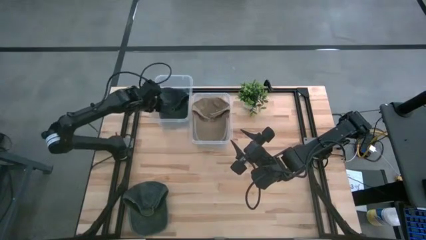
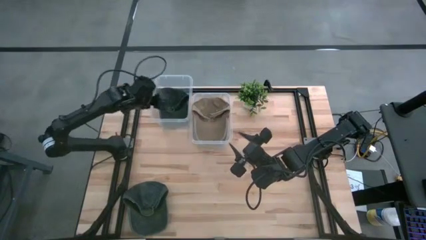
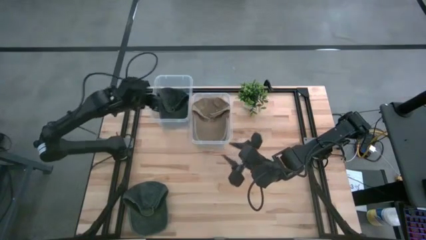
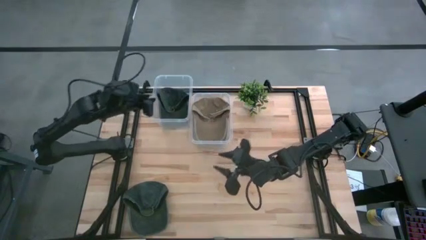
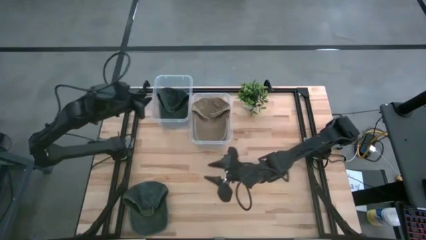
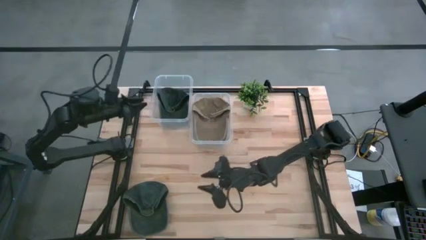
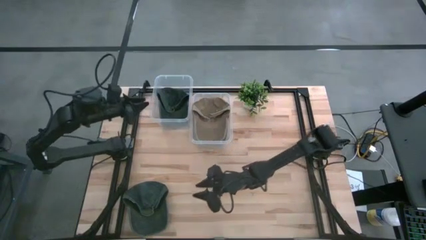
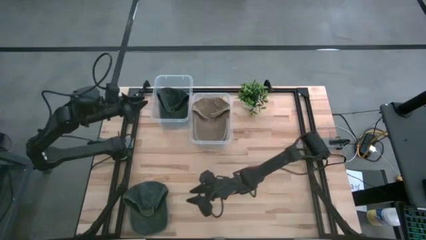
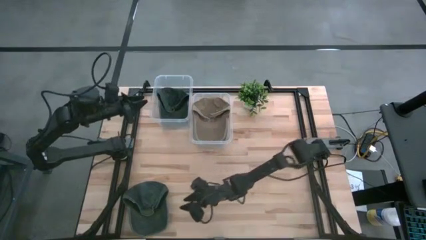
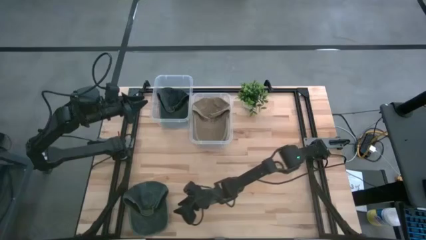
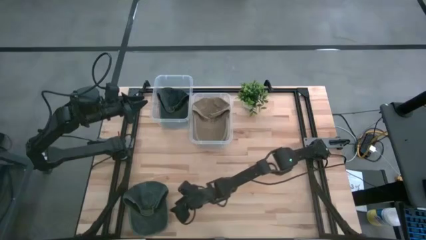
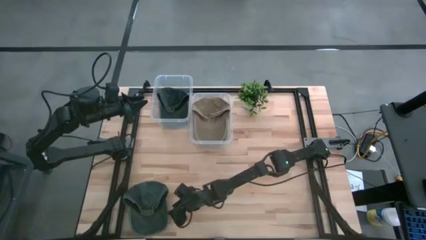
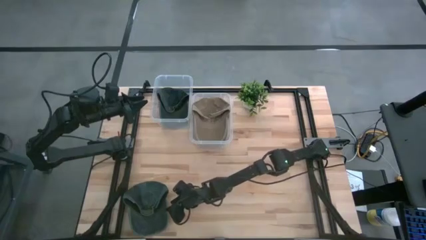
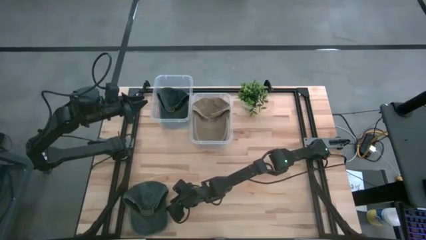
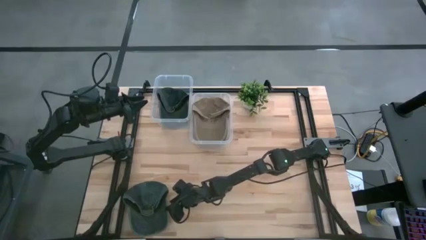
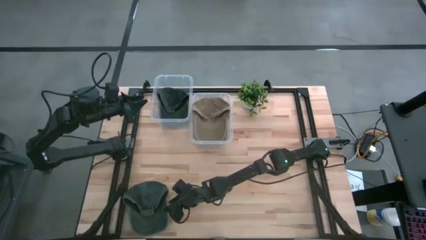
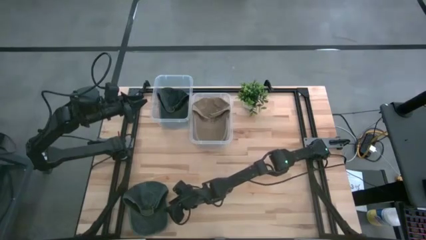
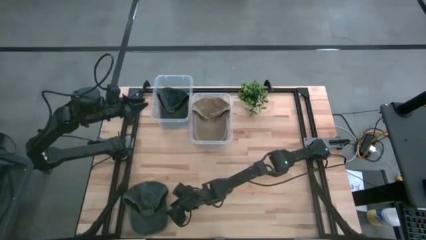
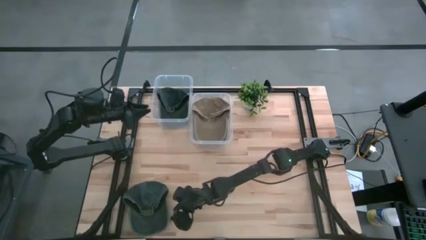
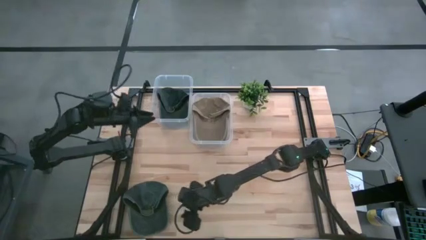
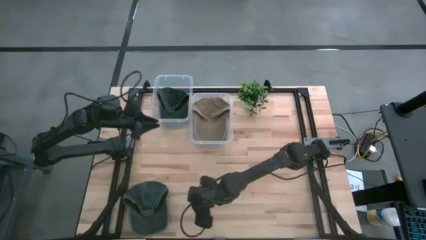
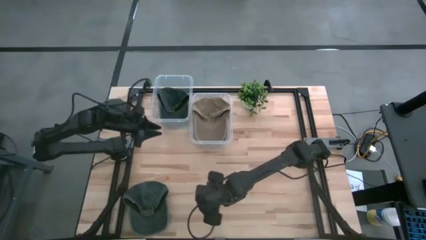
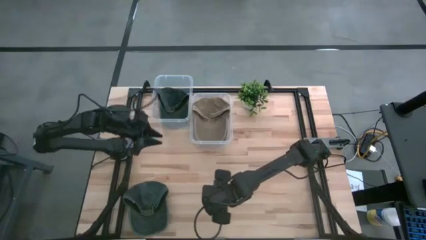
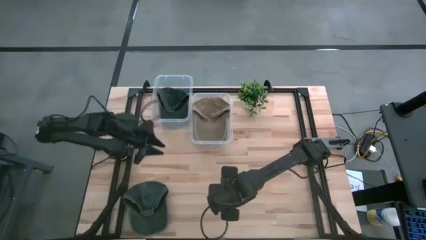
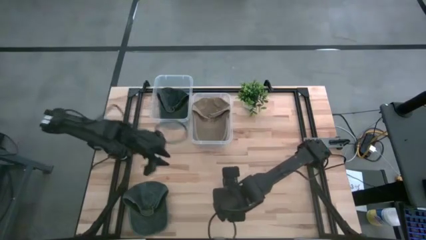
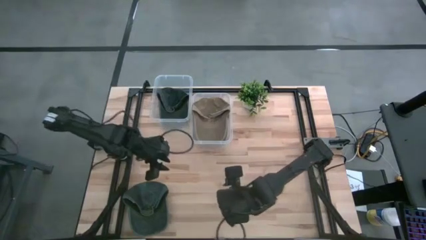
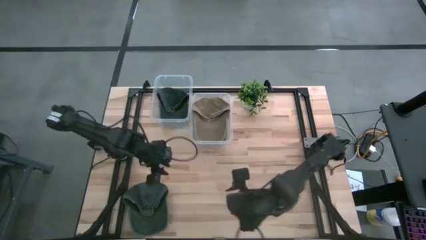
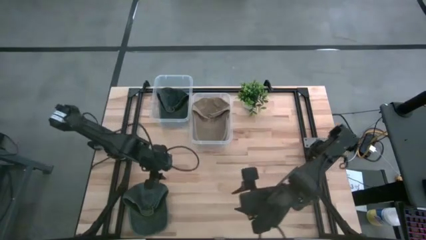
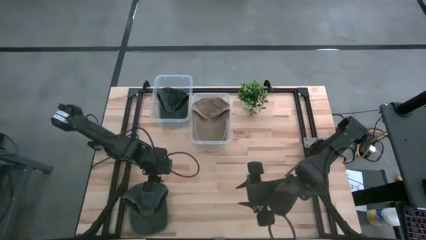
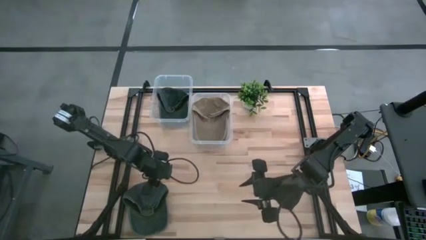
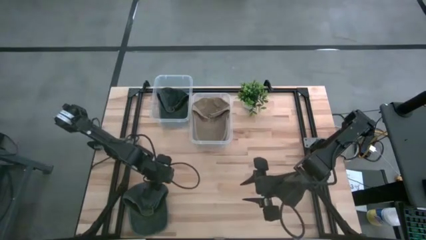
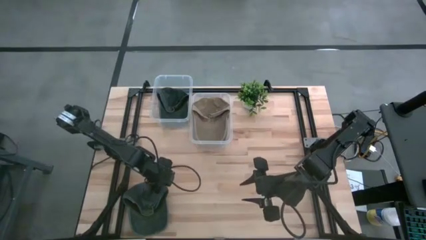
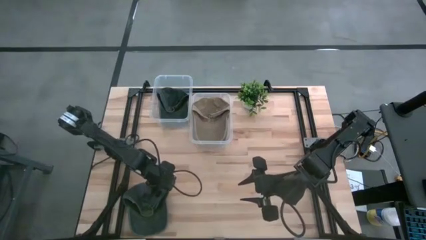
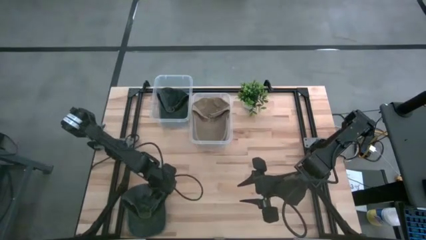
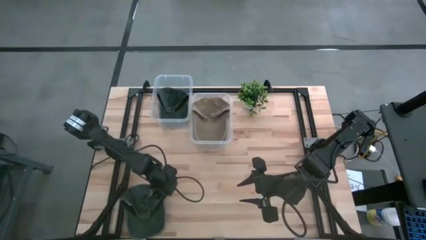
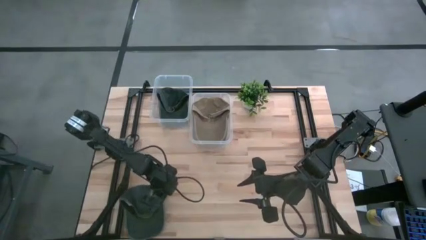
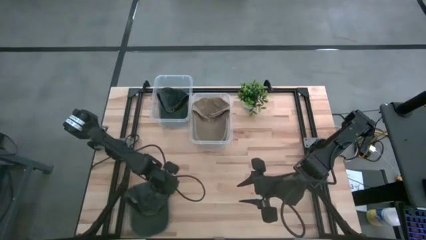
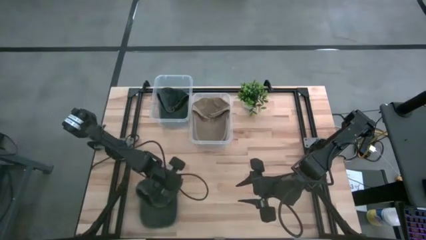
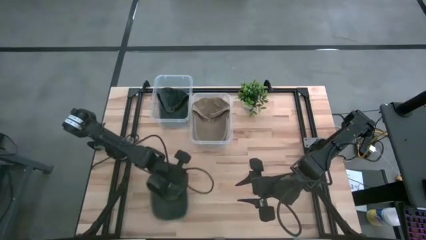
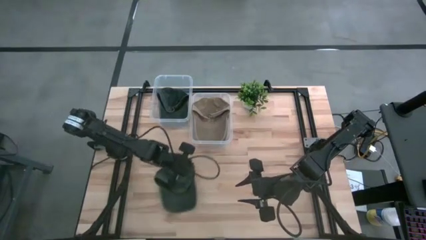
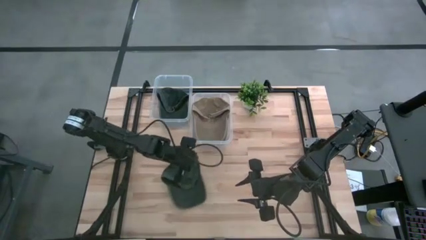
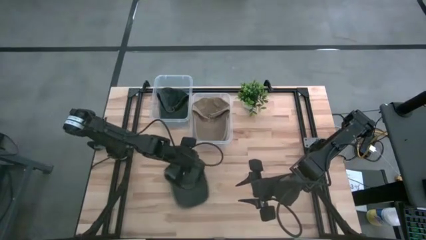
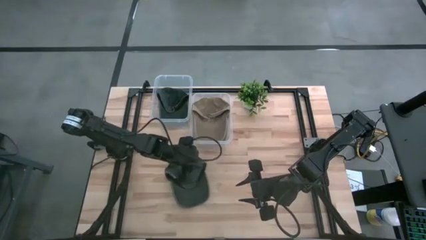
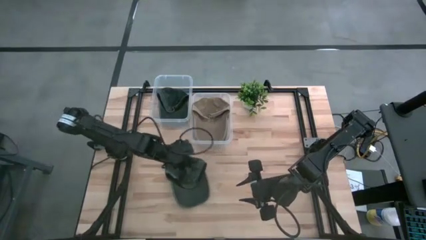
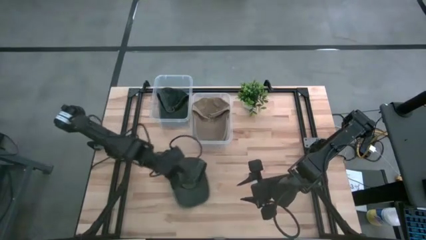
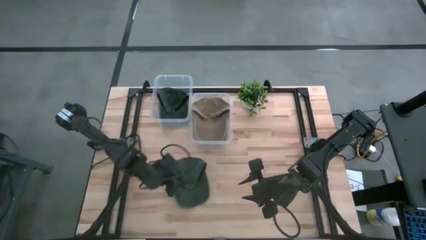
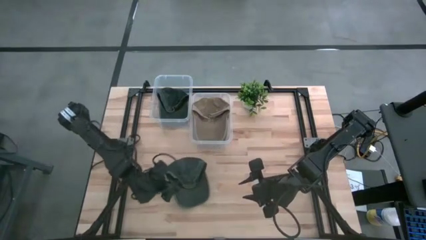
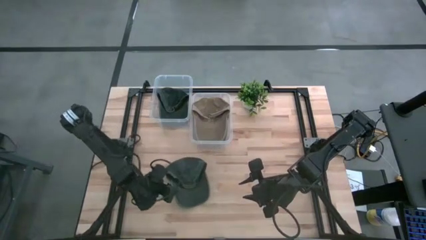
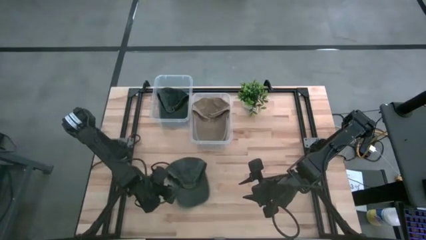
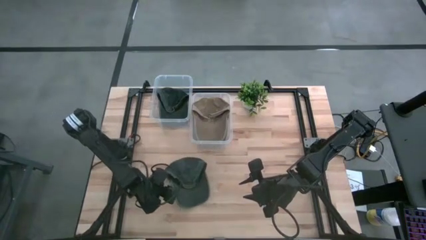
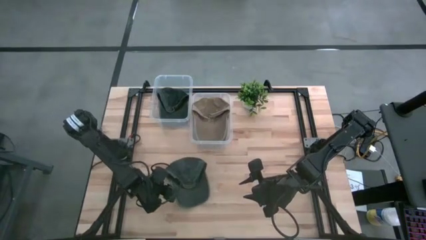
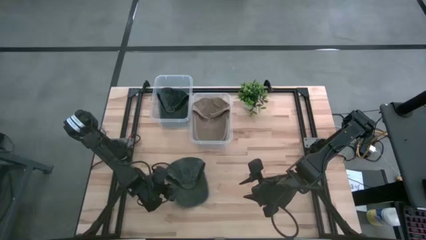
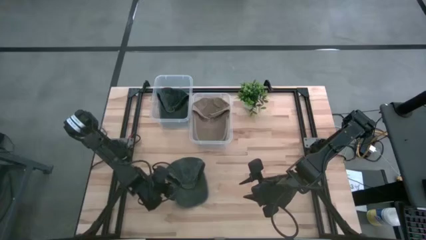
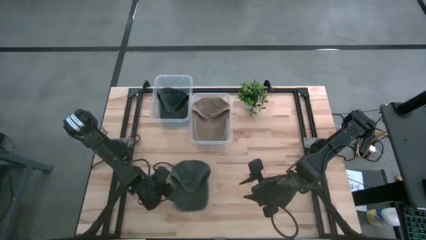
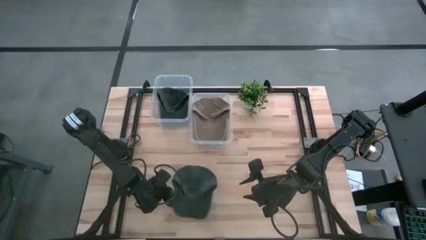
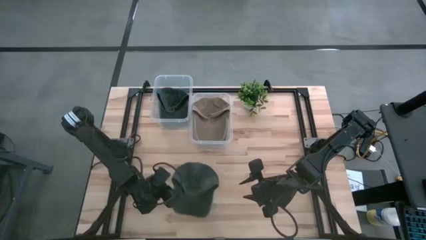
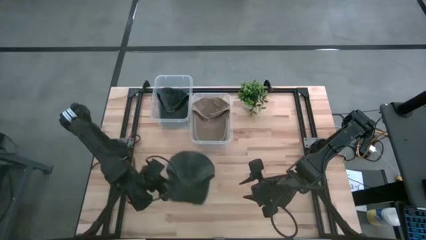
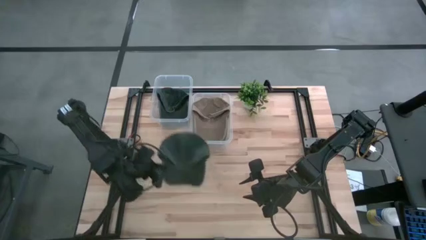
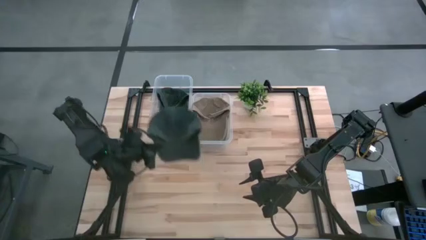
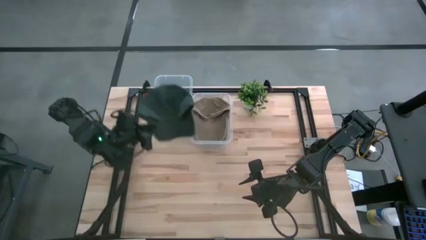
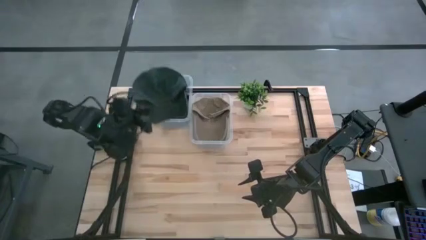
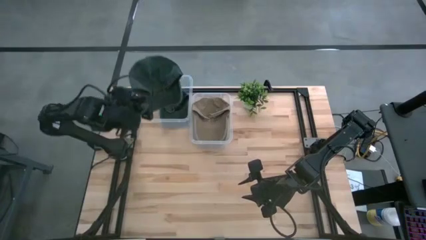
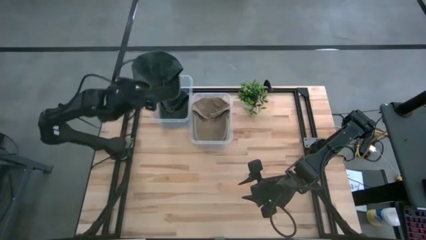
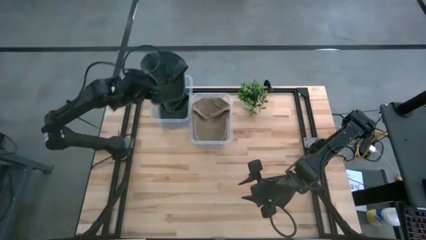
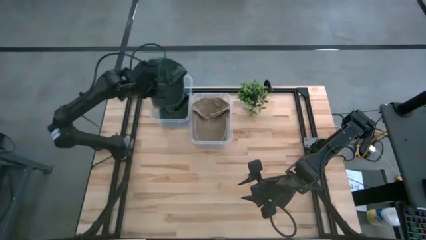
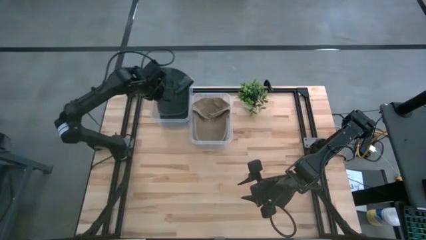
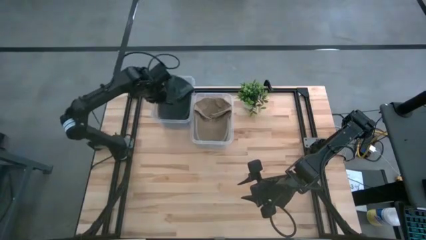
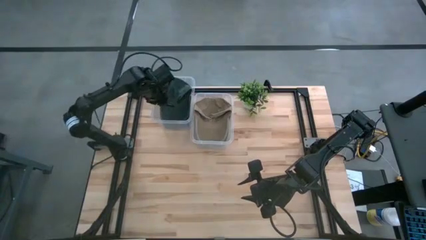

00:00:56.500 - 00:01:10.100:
Task: Pick & Place hat
Put the black cap into the left transparent bin
